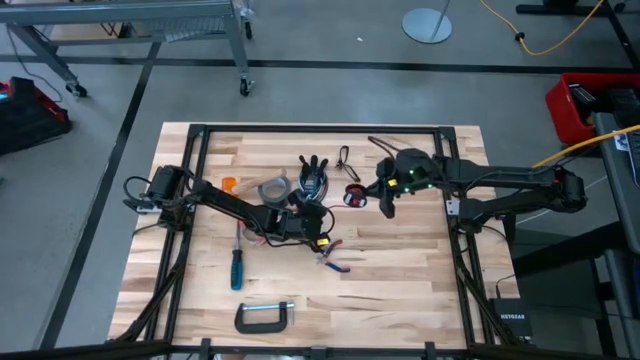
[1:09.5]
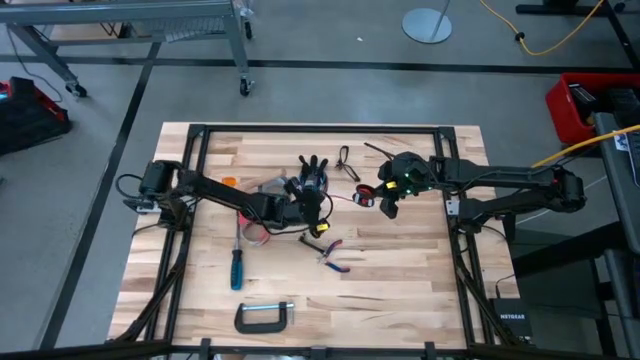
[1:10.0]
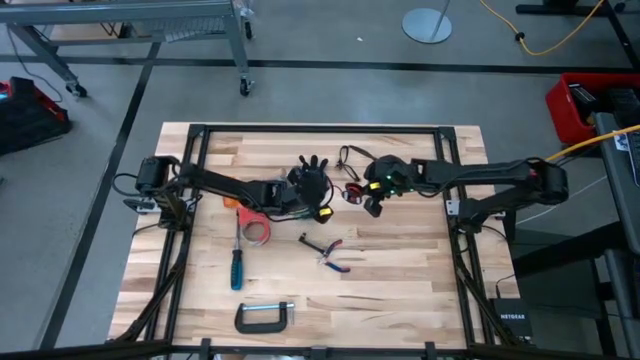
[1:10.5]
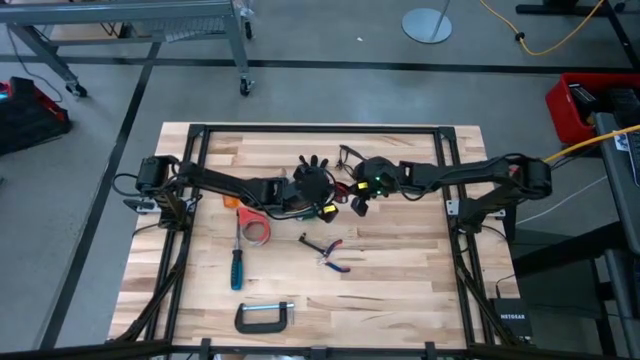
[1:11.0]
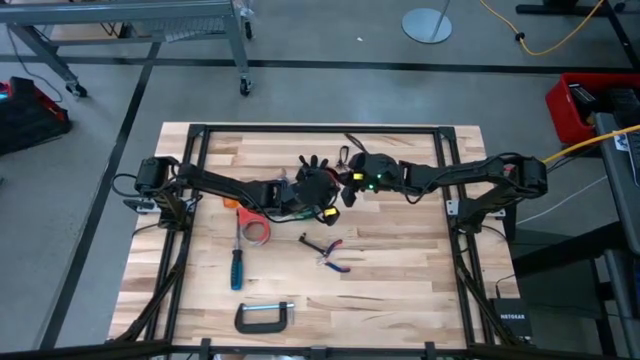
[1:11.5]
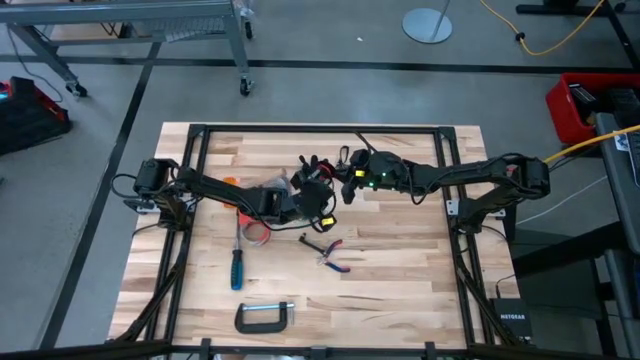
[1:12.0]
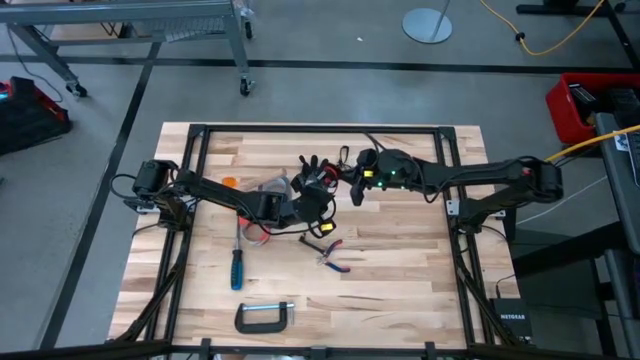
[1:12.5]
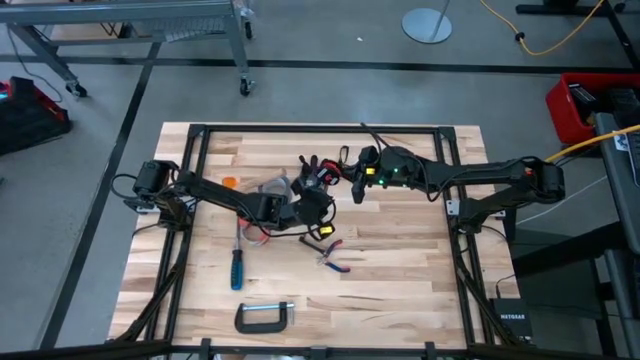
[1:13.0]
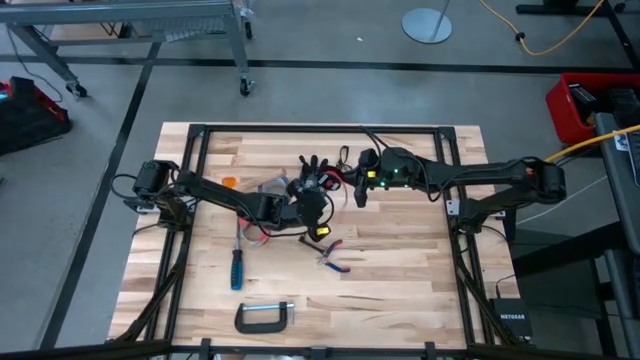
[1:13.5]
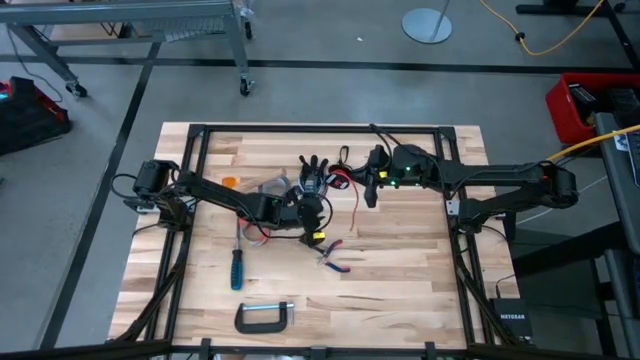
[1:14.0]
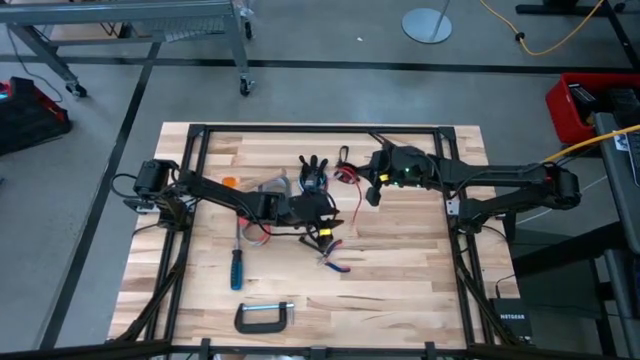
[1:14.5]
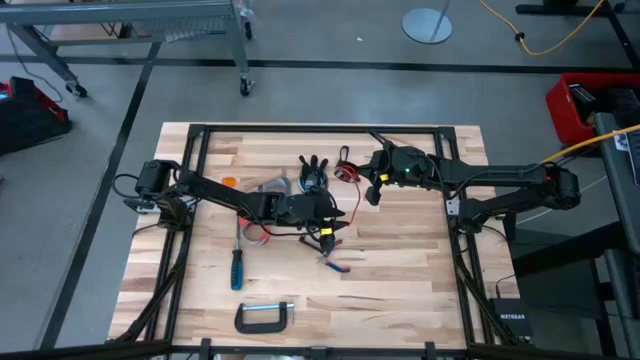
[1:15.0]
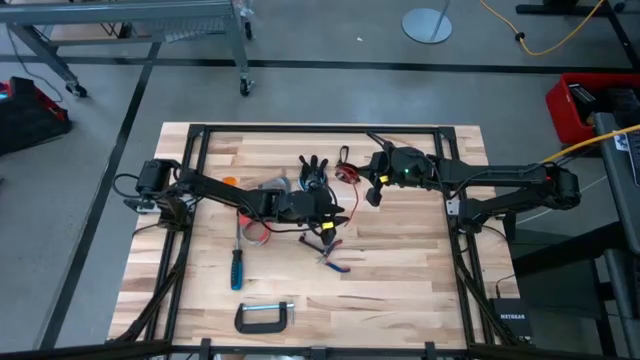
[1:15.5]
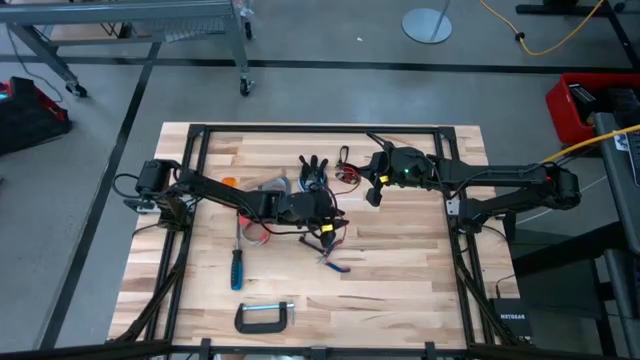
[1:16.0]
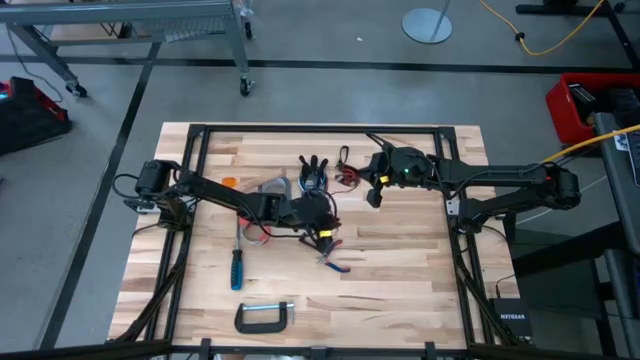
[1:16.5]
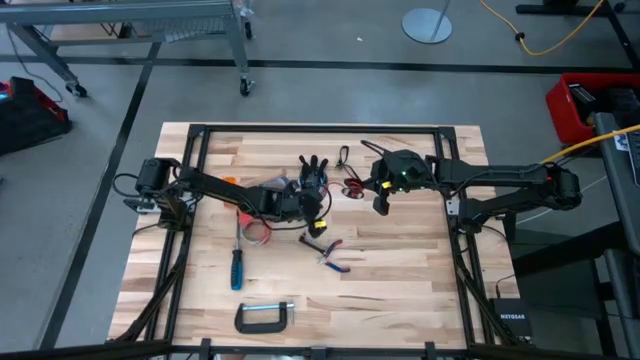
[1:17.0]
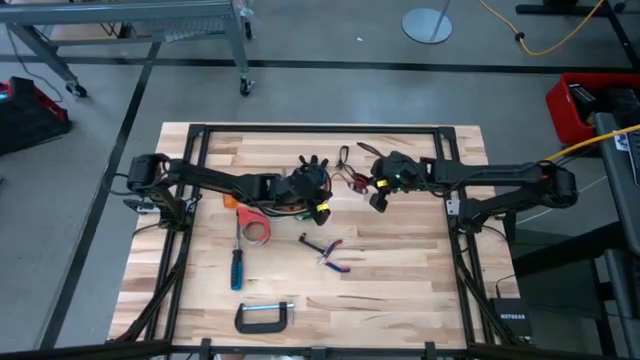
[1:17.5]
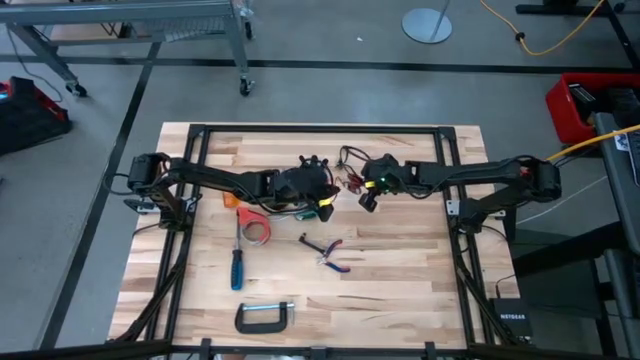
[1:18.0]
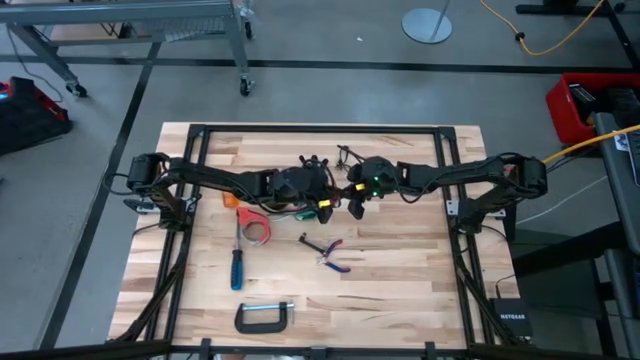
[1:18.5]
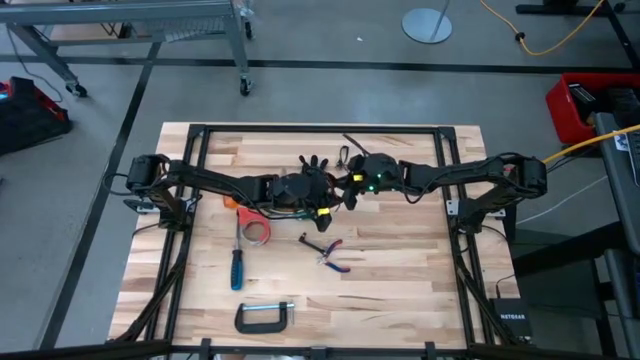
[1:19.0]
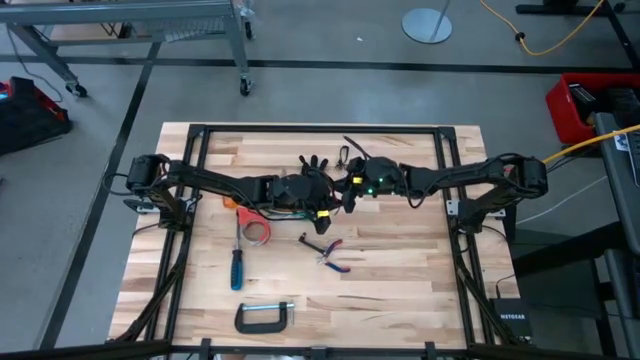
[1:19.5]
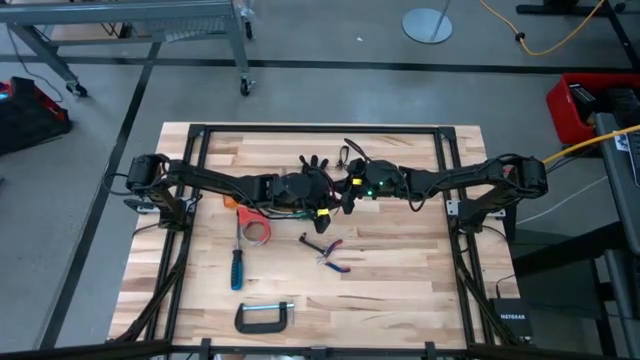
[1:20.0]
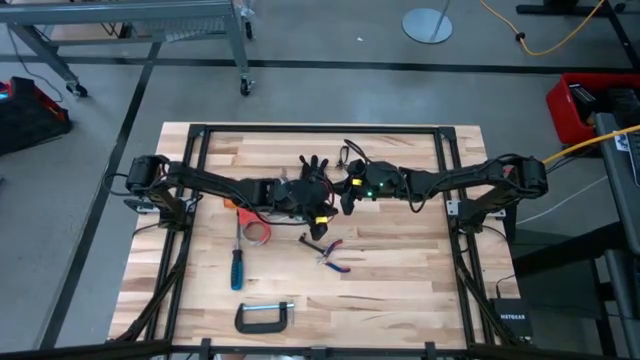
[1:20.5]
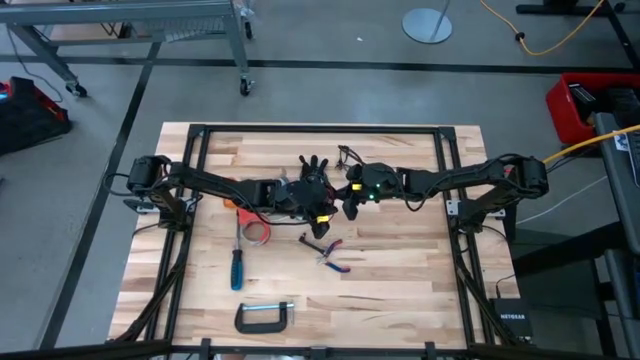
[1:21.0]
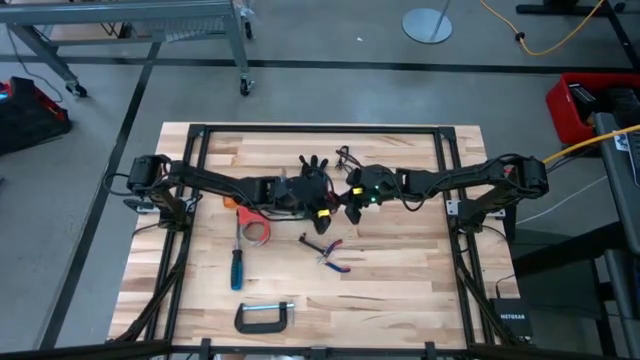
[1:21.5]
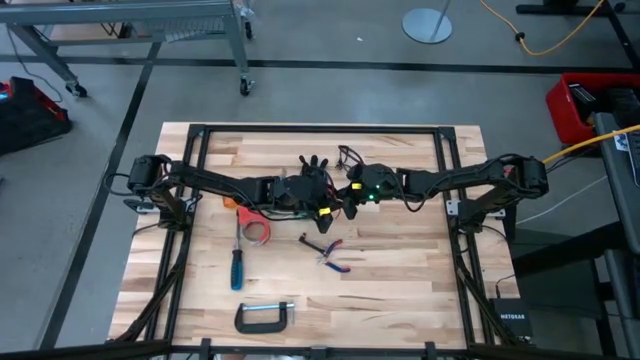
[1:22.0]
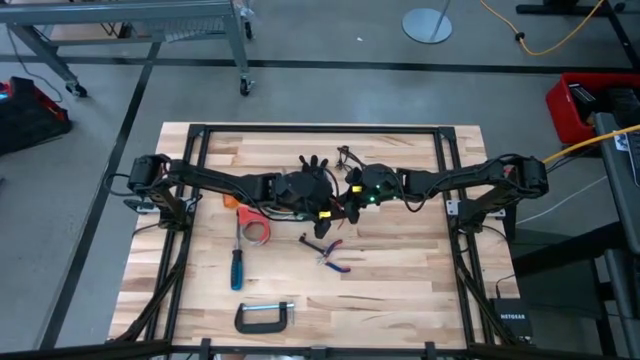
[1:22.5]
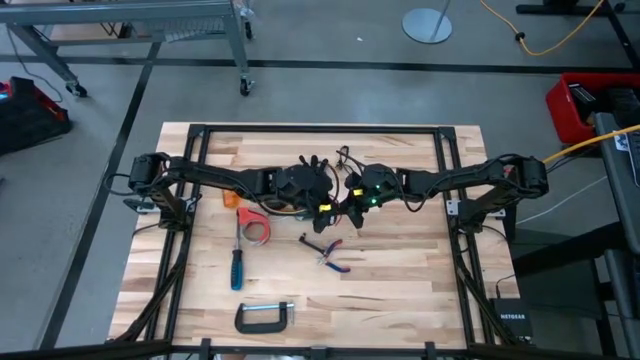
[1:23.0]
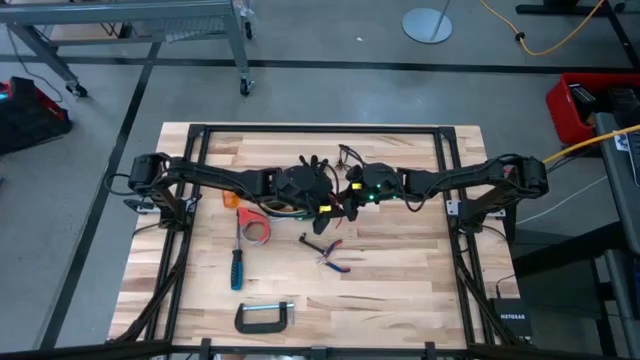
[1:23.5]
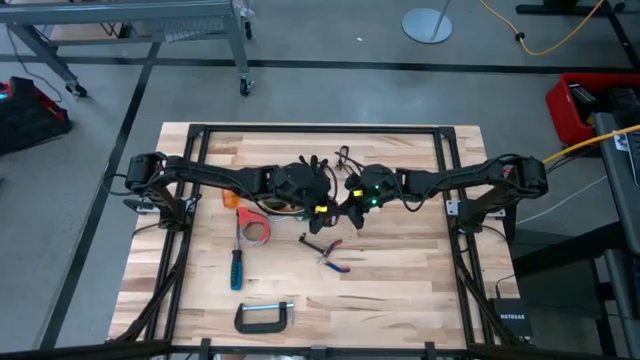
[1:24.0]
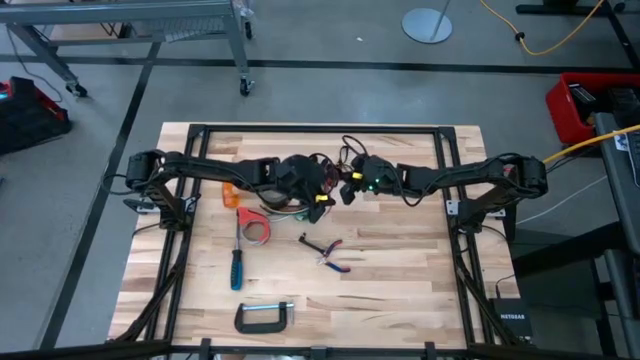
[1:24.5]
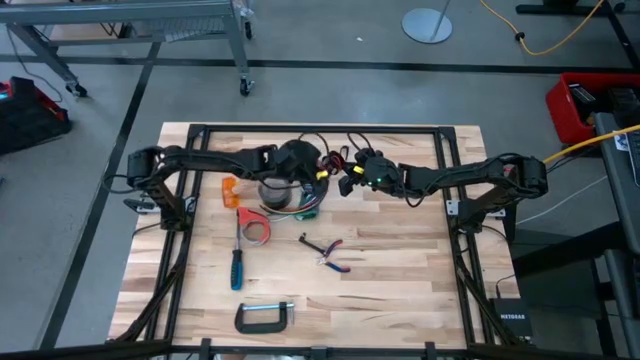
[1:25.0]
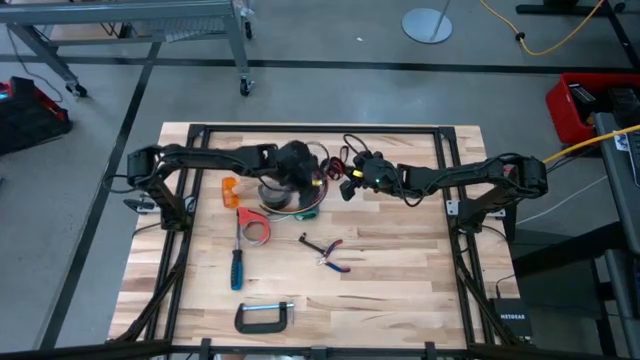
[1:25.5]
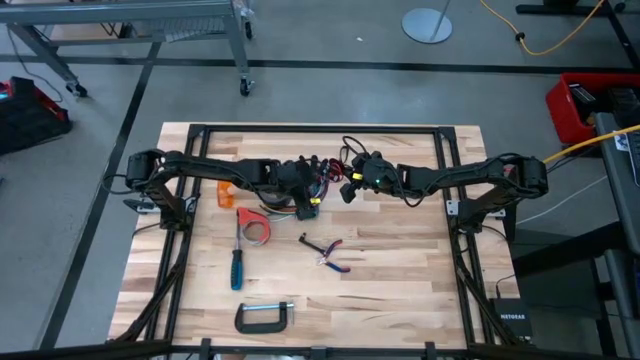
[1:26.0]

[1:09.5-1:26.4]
Task: Coil cords
Coil the red wire onto the black spool

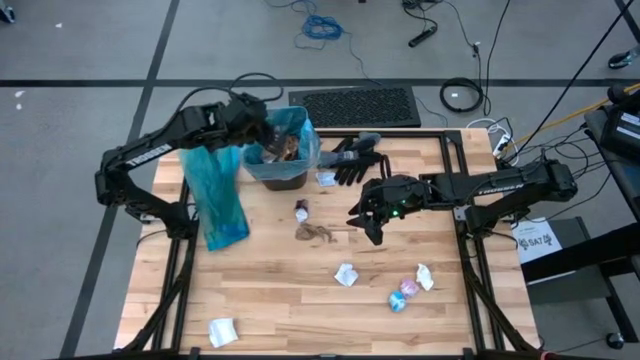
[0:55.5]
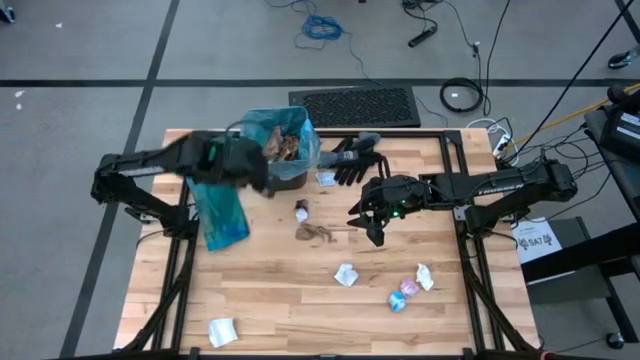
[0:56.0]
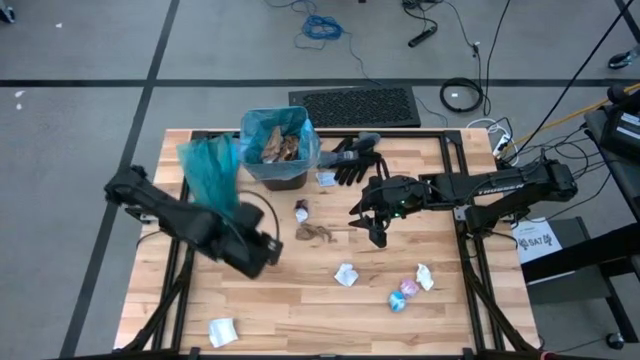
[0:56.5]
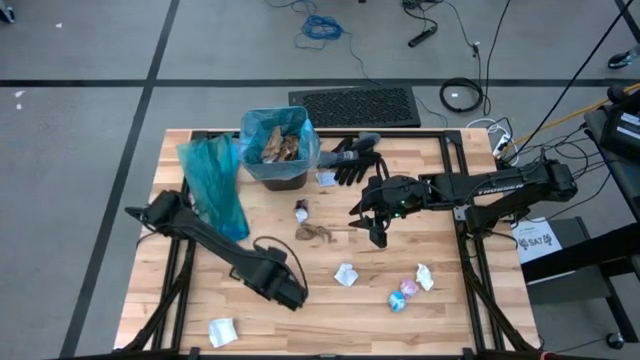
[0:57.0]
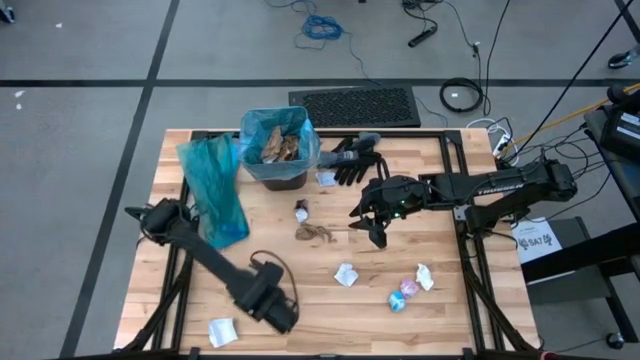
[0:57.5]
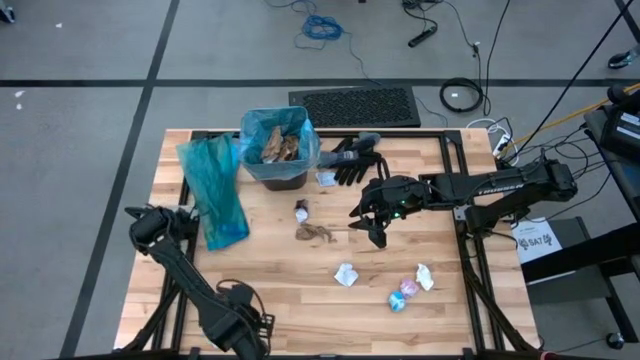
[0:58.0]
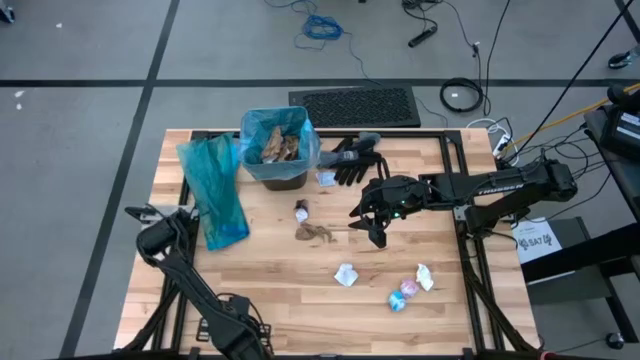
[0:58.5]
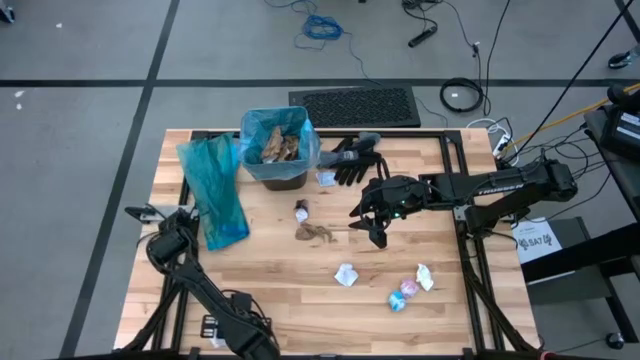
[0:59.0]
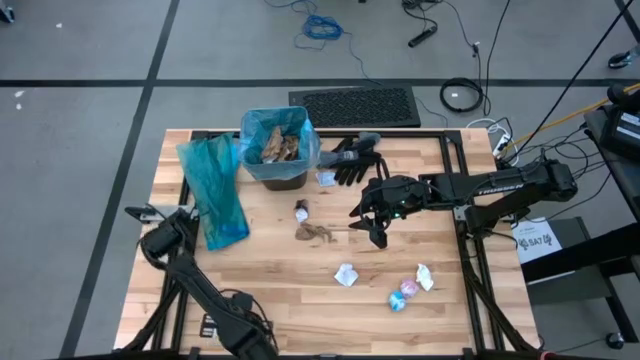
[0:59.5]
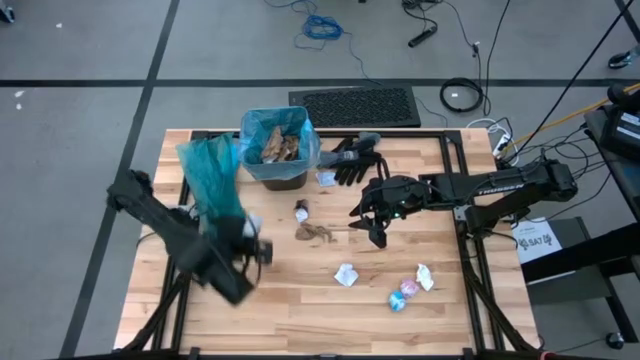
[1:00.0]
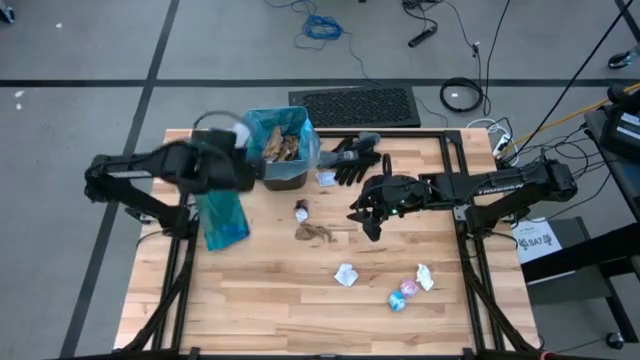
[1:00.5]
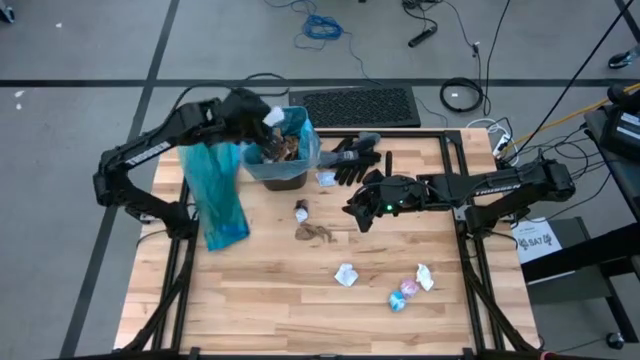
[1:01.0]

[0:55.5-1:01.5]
Task: place trash/remove bag and relplace
Put the white cardboard into the trash bin
